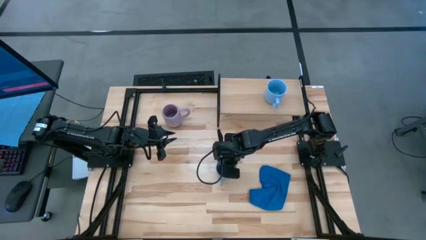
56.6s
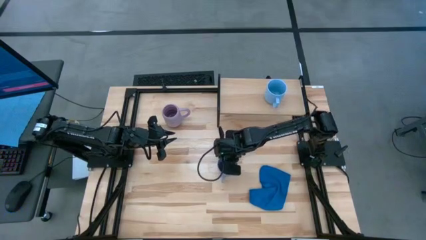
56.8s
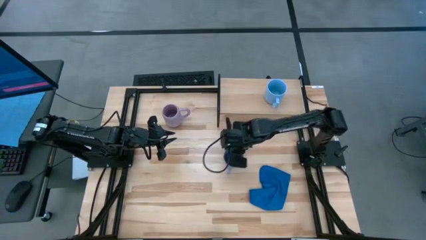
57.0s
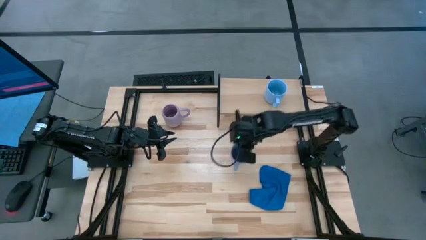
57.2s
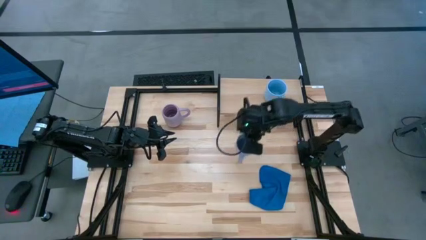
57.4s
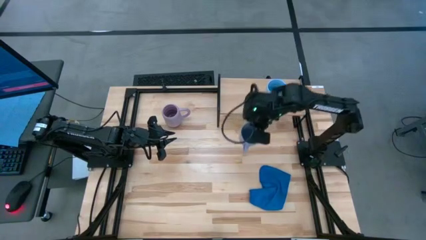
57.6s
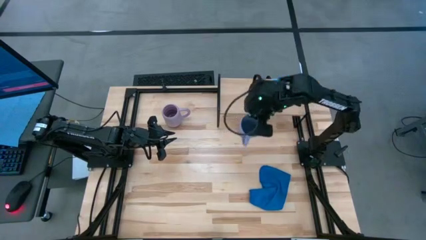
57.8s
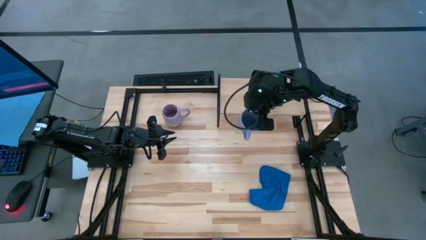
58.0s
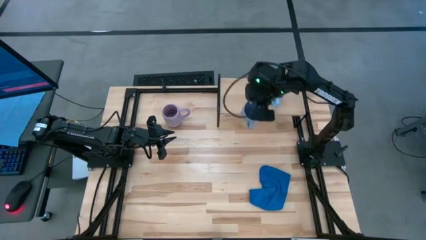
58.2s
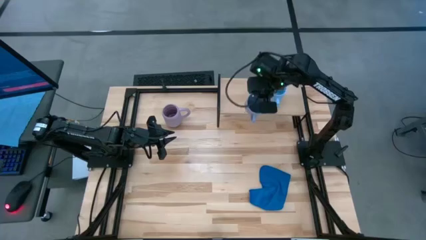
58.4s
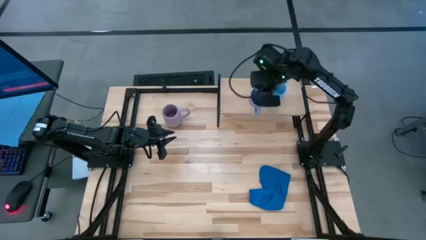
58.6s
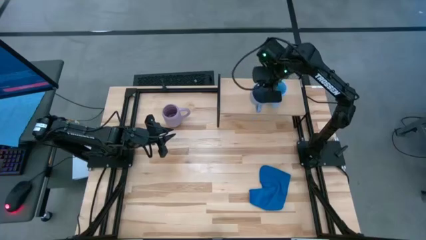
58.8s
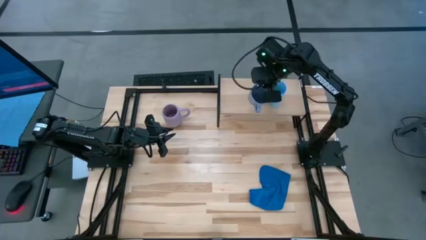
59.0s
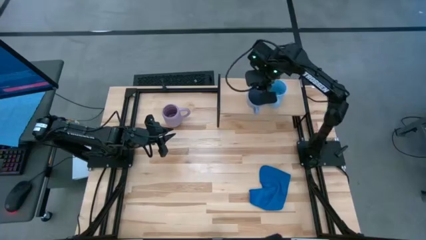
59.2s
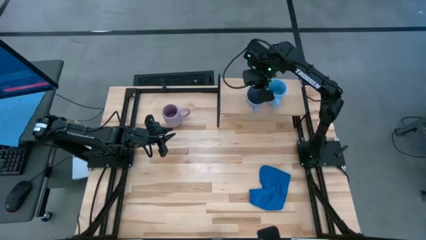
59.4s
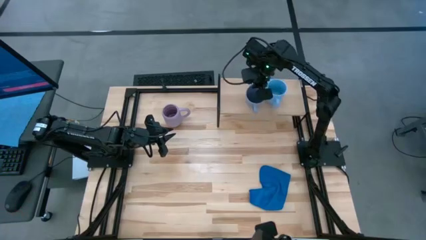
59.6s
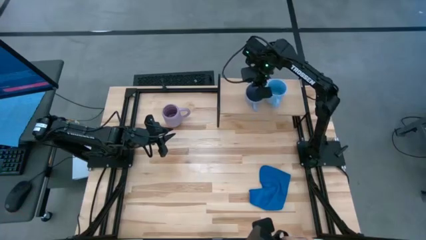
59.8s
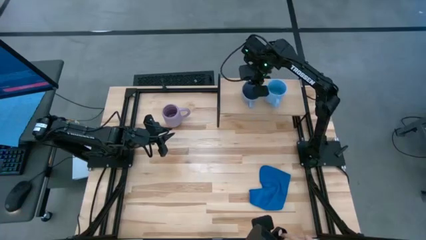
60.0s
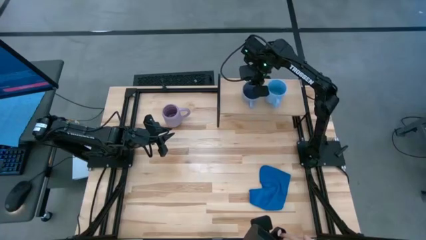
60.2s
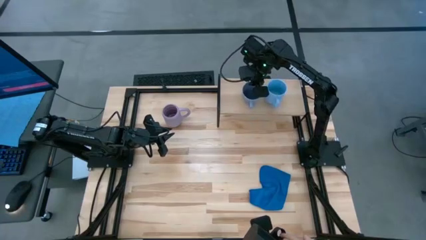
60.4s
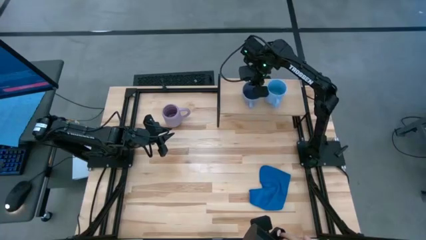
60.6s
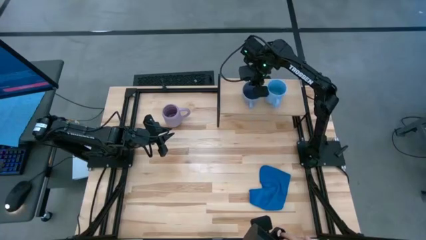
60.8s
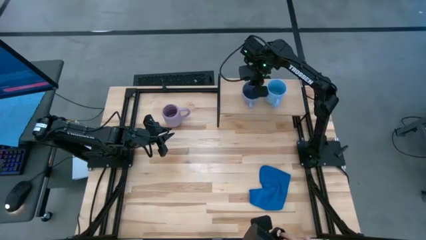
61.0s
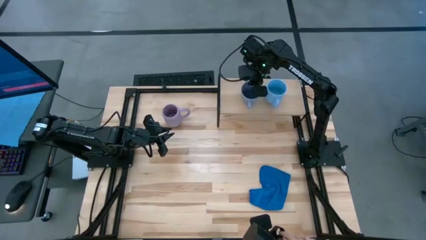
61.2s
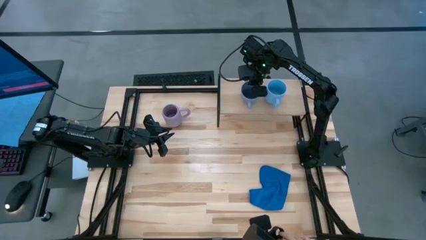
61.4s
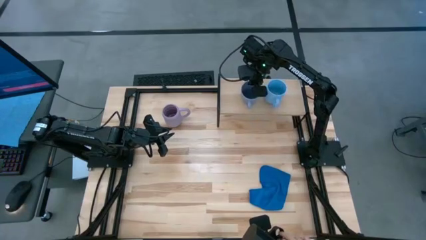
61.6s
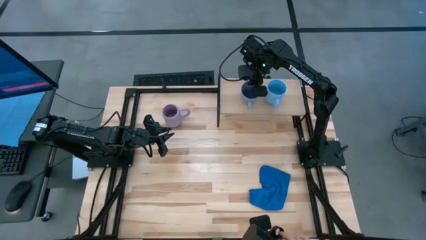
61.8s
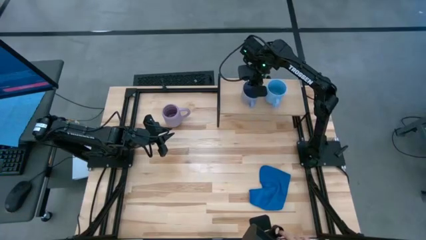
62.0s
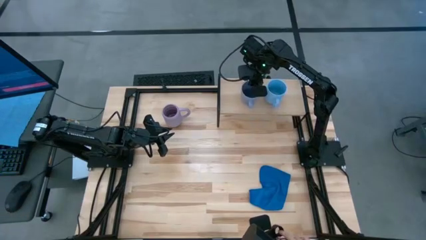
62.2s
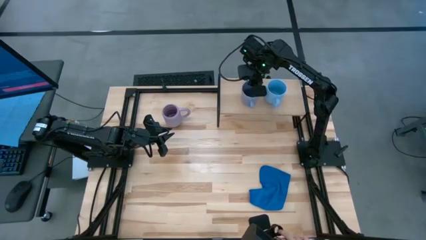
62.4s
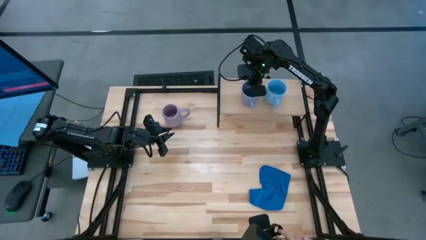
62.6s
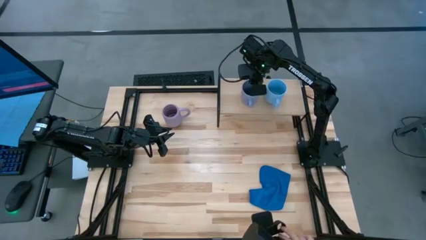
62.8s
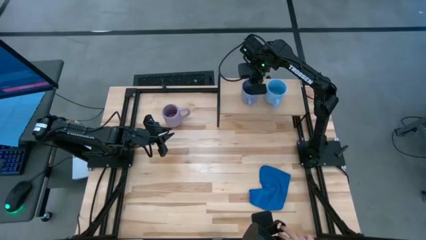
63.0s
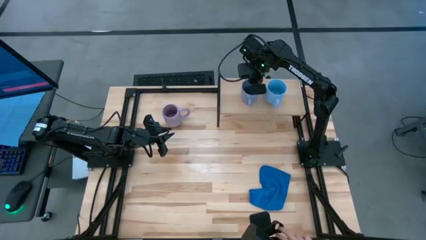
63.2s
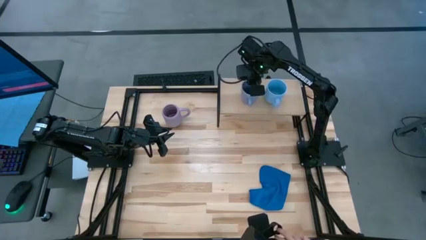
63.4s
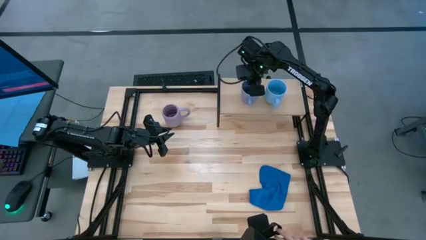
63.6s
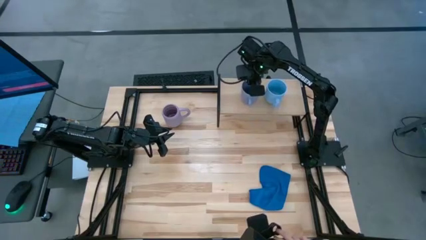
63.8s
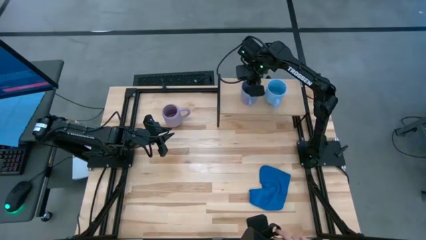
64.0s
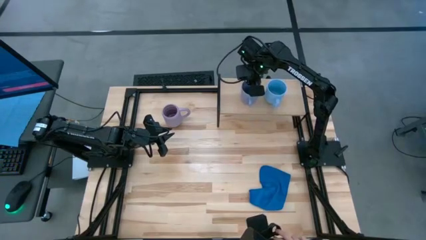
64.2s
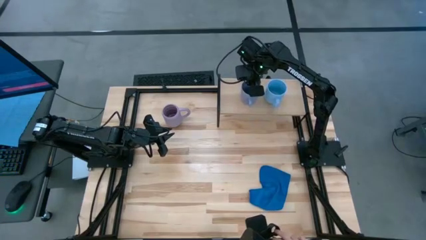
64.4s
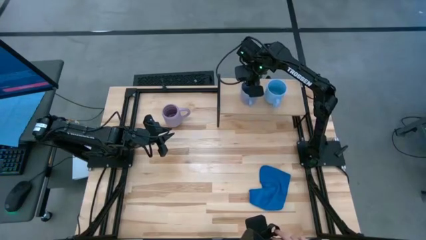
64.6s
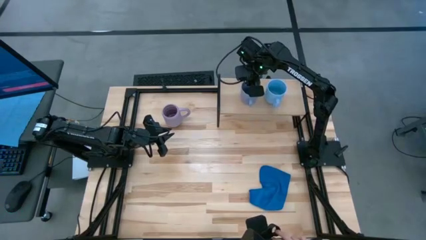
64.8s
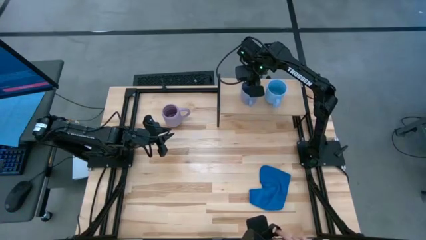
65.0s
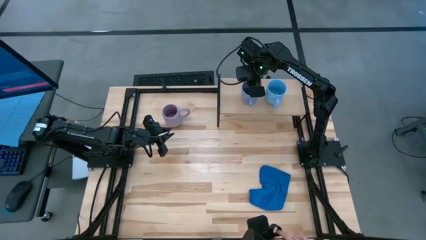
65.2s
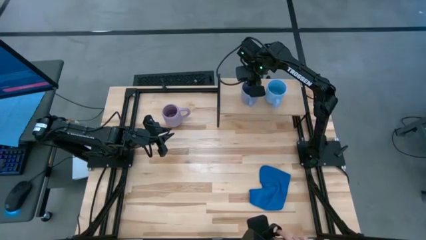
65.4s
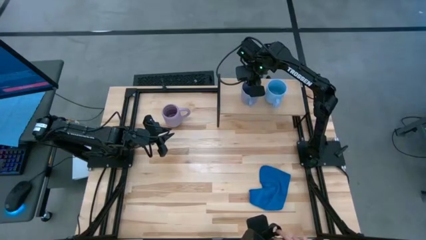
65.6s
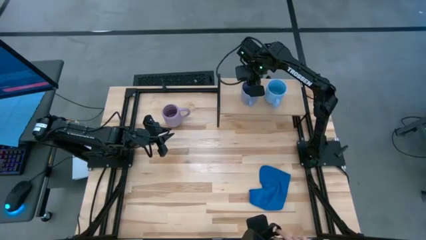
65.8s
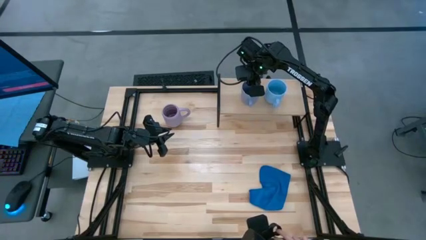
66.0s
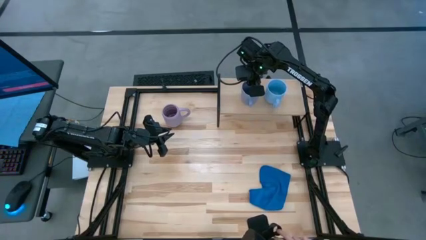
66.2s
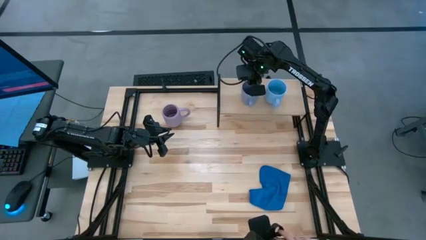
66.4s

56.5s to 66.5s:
Task: Stack small to large cups/mugs on shelf
Put the blue mug on the shelf

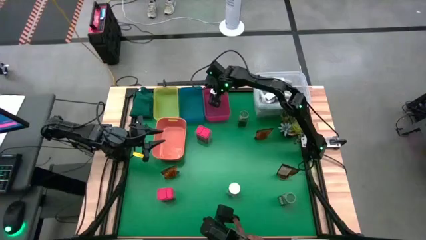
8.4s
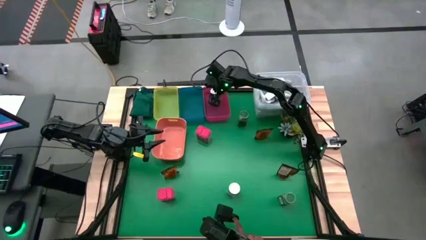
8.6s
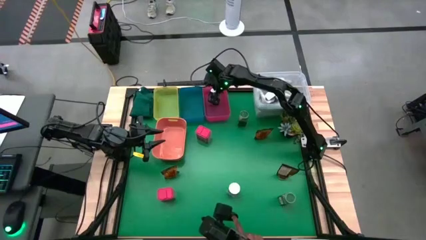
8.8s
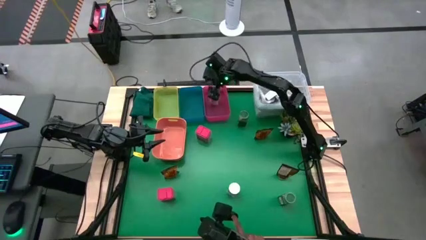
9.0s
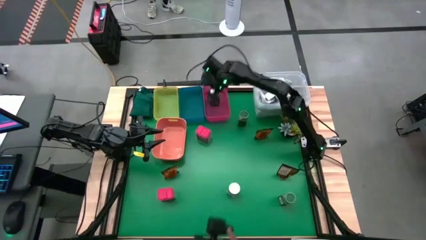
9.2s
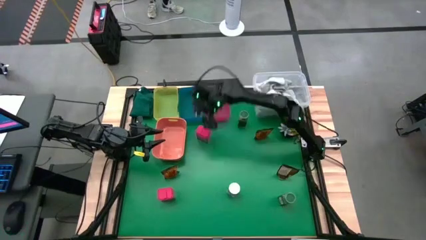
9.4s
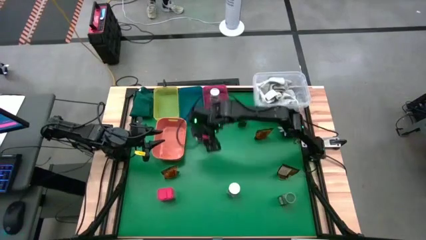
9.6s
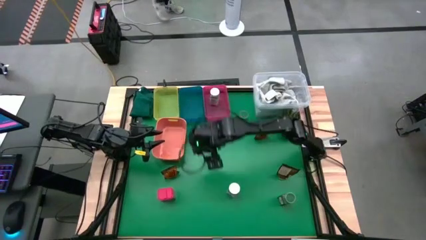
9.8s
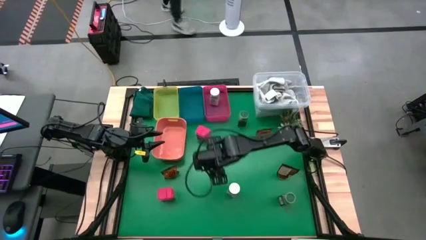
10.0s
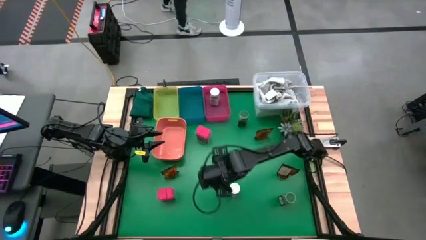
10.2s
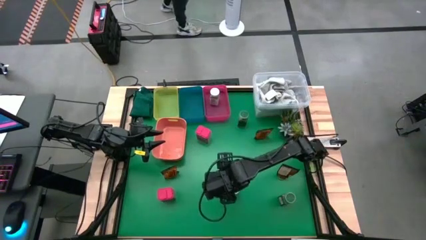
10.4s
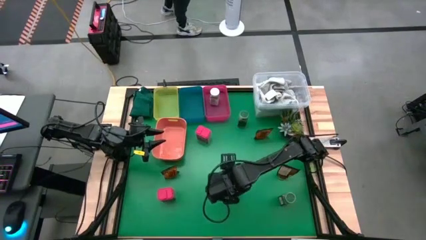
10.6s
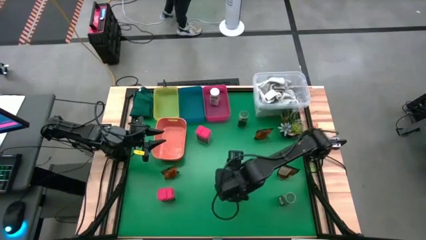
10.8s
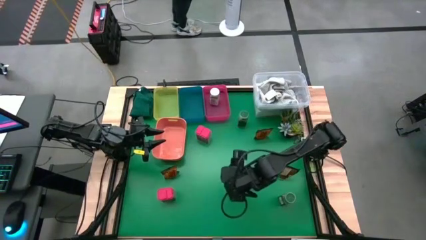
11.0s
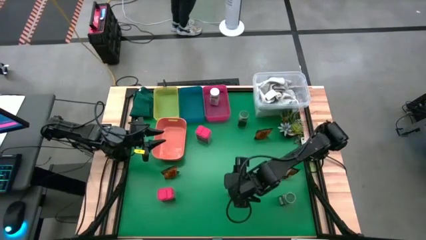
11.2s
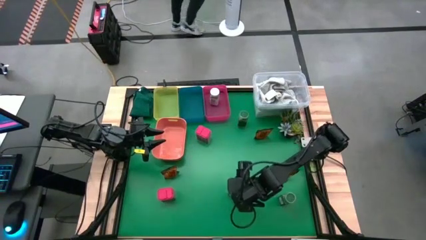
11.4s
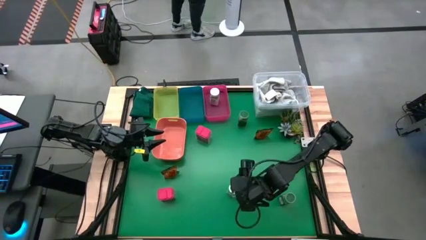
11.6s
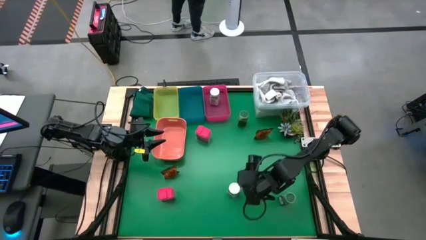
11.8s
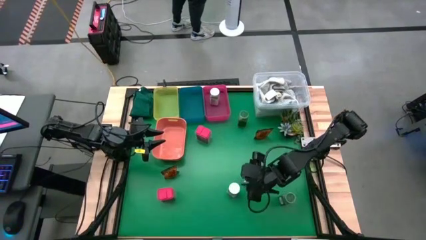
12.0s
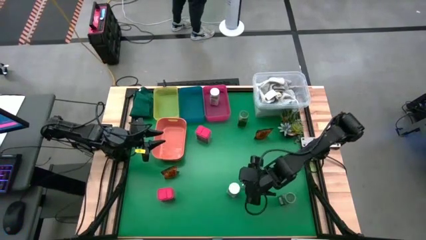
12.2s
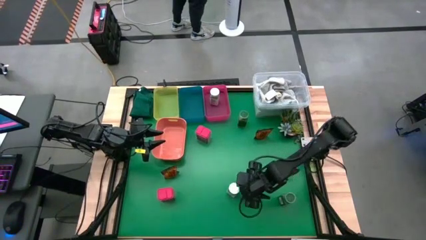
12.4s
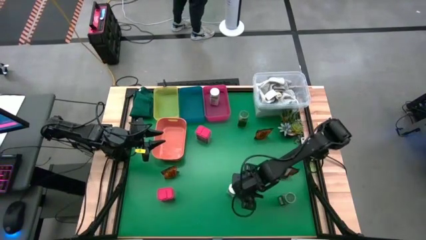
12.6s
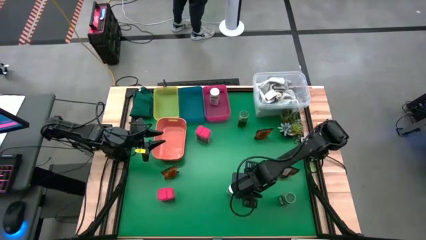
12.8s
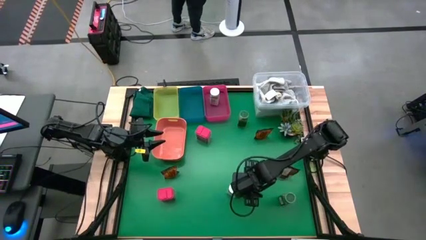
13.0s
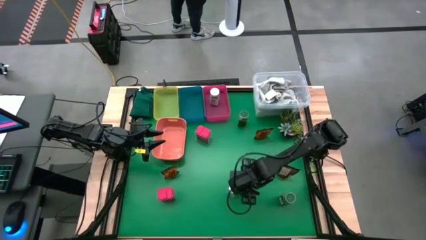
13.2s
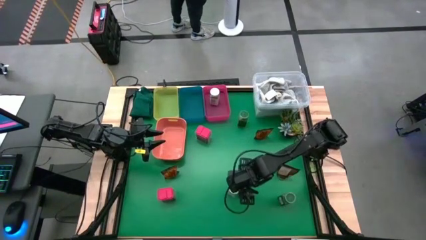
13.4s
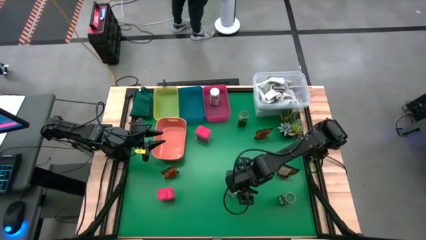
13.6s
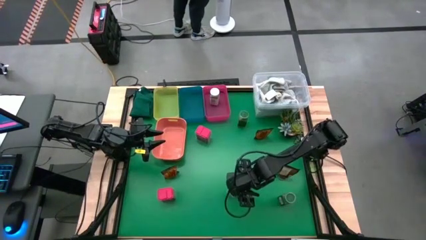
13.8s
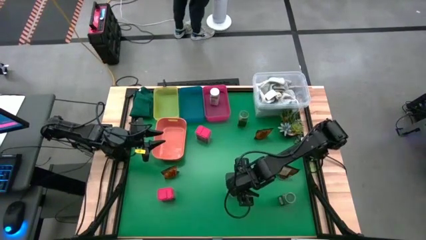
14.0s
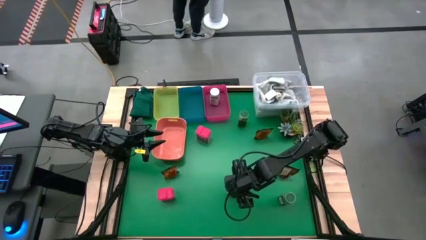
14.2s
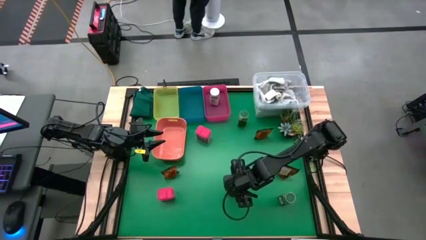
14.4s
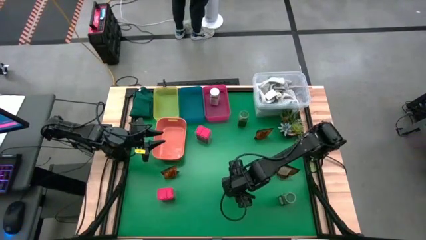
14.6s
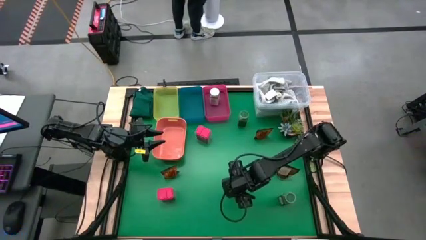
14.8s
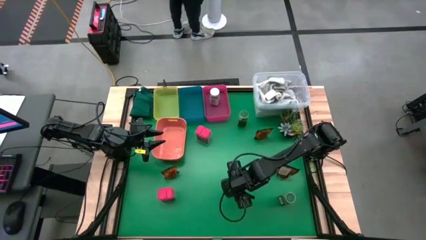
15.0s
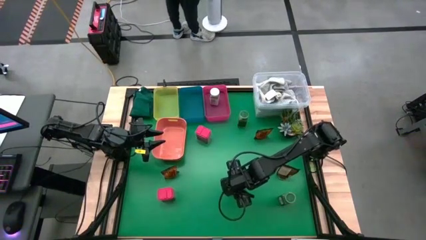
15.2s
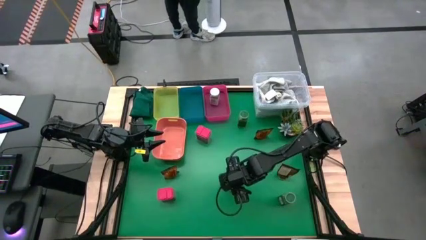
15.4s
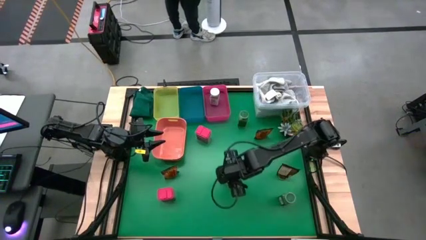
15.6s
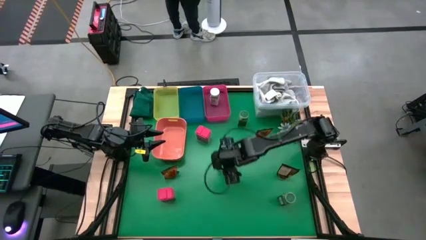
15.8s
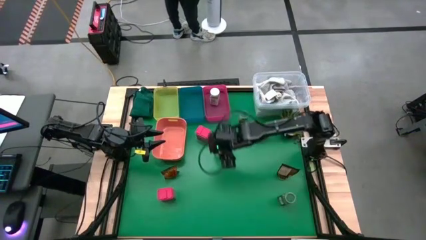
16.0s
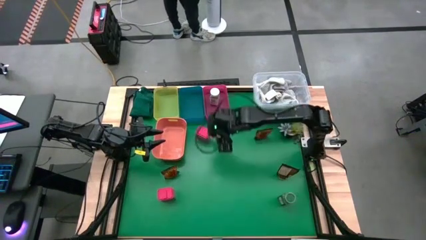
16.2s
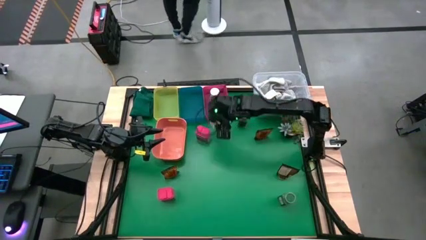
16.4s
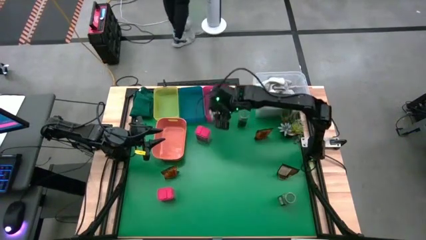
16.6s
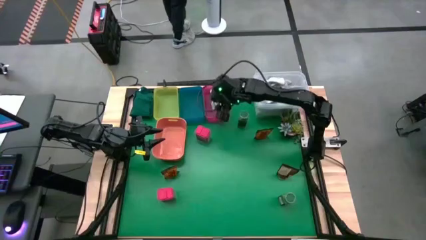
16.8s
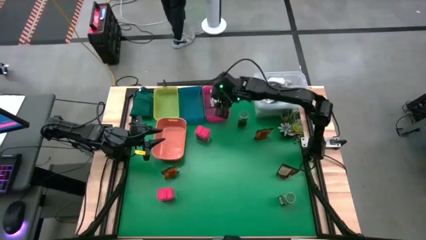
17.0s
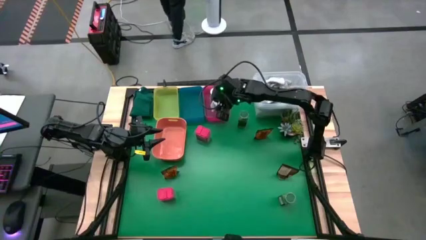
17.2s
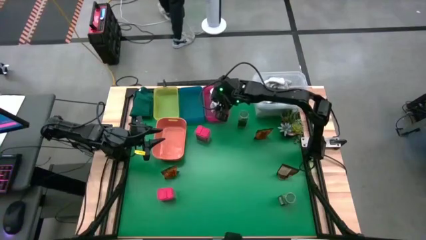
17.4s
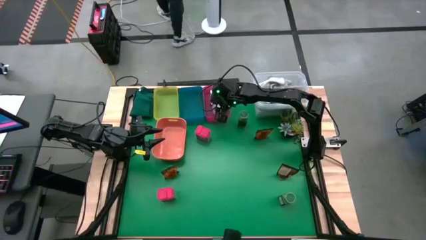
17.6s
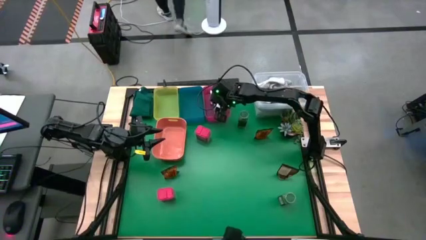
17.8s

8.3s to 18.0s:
Task: Sort spices by type
Put the white seasoning bottle into the red bin
